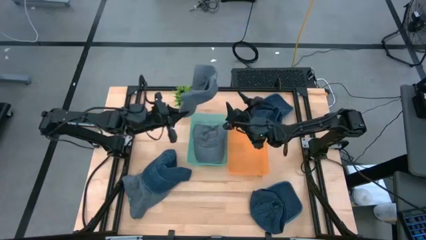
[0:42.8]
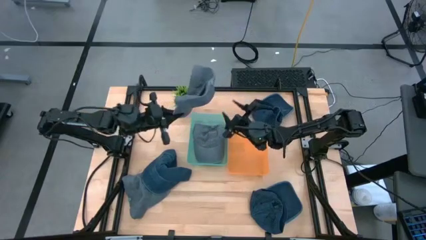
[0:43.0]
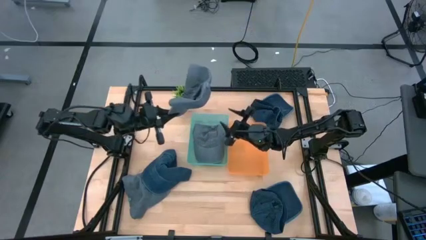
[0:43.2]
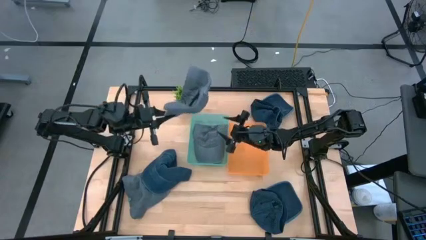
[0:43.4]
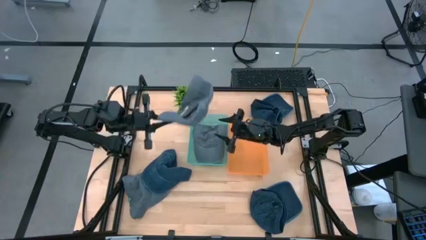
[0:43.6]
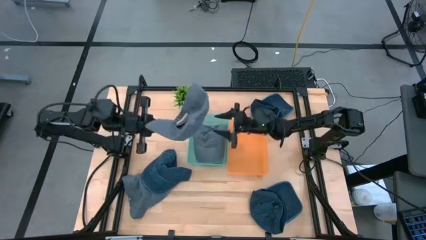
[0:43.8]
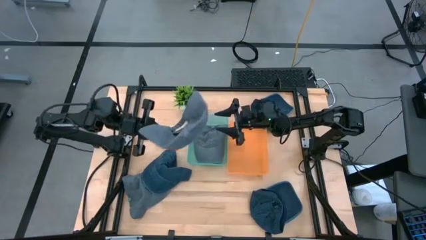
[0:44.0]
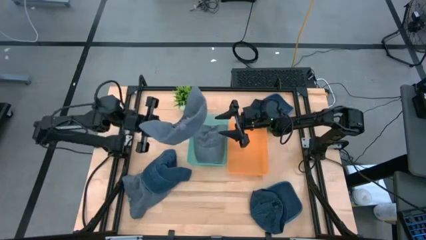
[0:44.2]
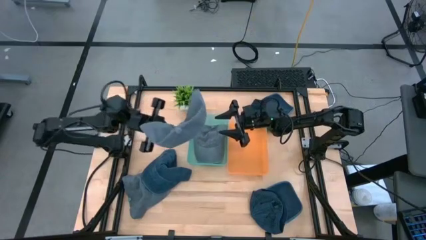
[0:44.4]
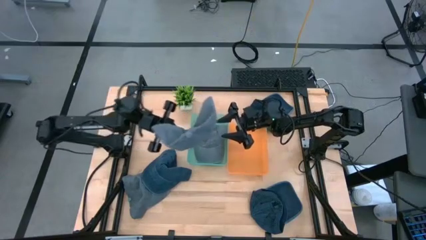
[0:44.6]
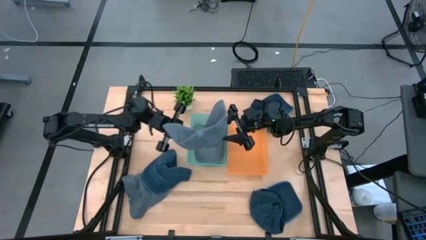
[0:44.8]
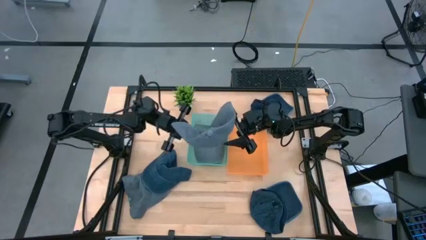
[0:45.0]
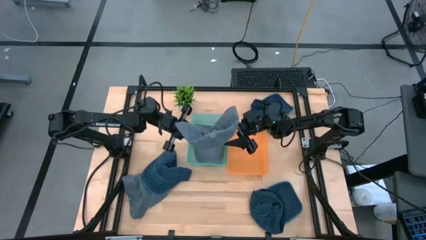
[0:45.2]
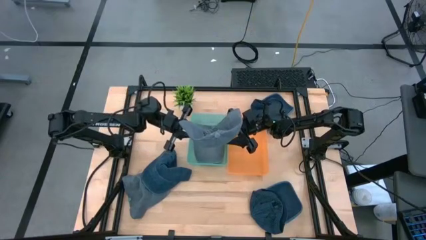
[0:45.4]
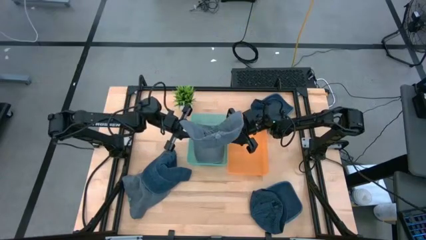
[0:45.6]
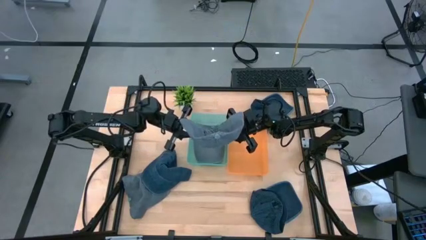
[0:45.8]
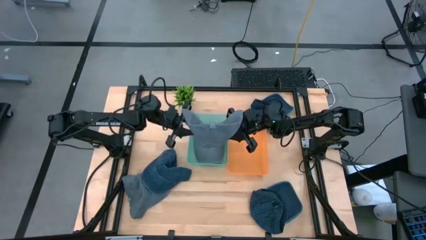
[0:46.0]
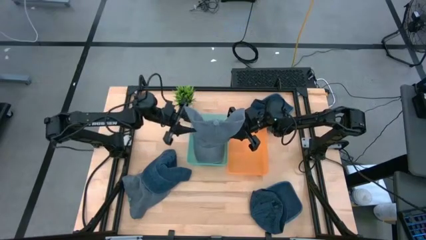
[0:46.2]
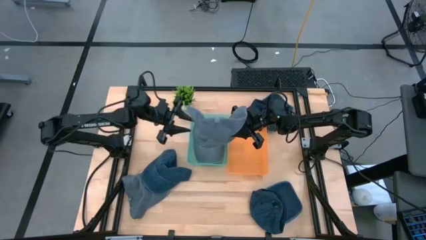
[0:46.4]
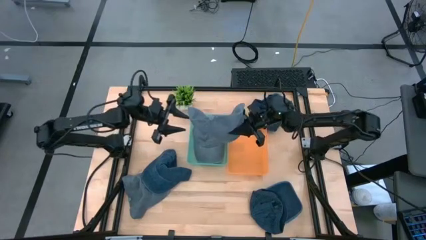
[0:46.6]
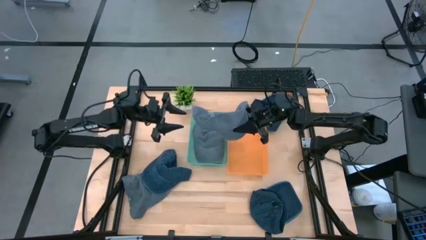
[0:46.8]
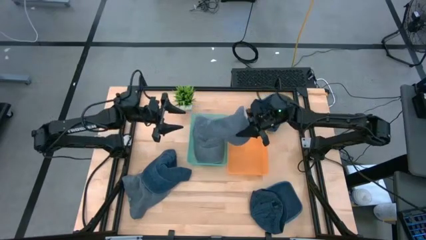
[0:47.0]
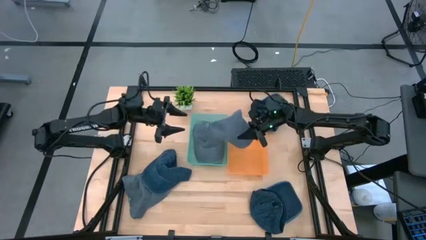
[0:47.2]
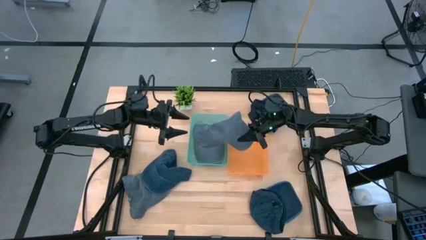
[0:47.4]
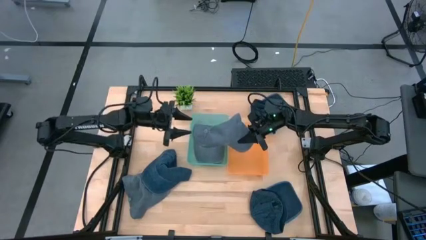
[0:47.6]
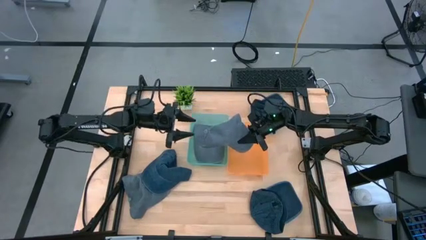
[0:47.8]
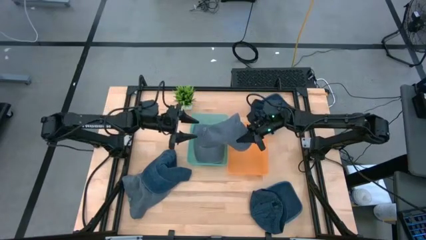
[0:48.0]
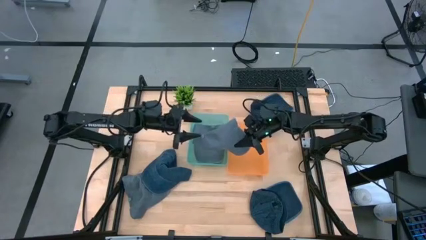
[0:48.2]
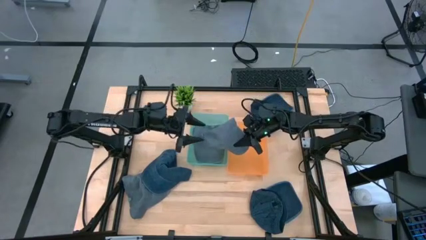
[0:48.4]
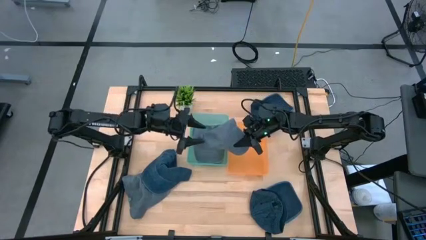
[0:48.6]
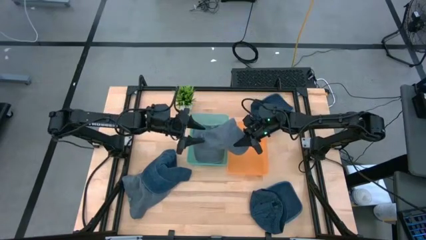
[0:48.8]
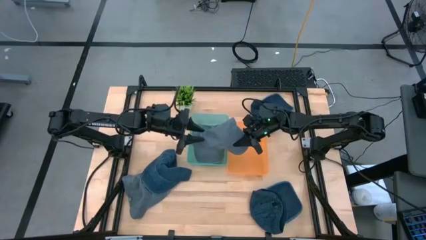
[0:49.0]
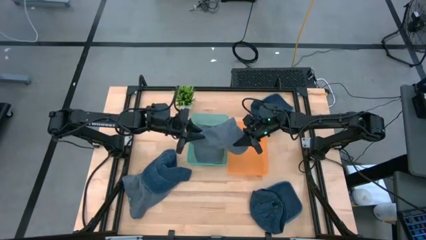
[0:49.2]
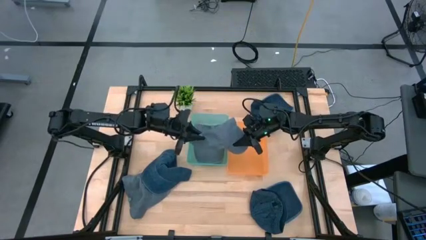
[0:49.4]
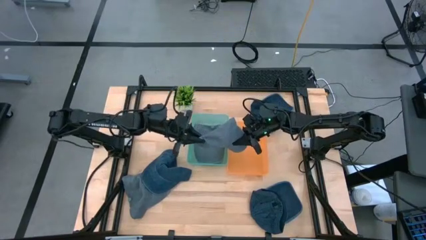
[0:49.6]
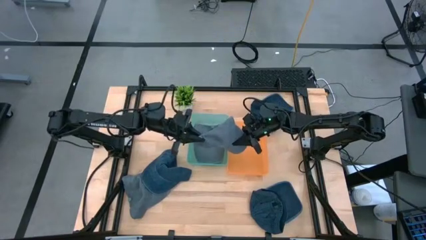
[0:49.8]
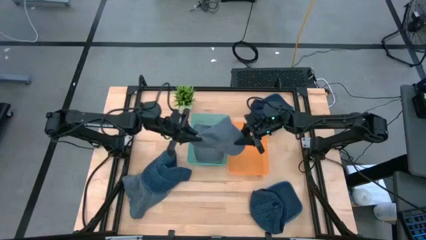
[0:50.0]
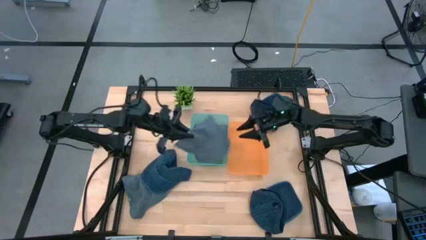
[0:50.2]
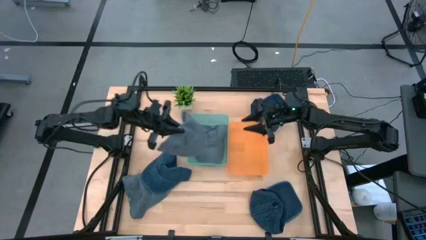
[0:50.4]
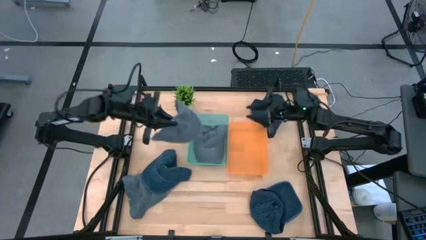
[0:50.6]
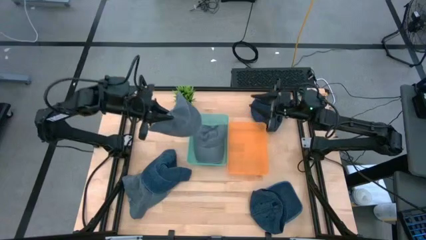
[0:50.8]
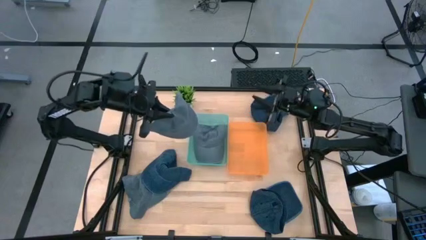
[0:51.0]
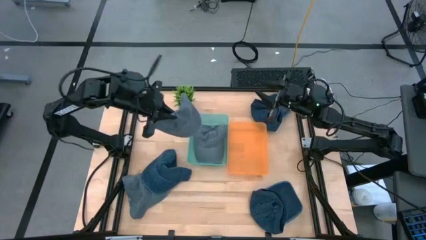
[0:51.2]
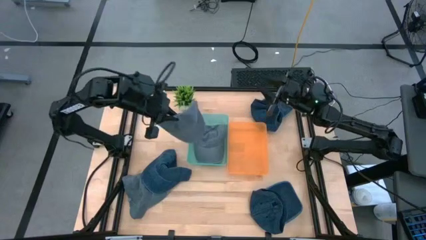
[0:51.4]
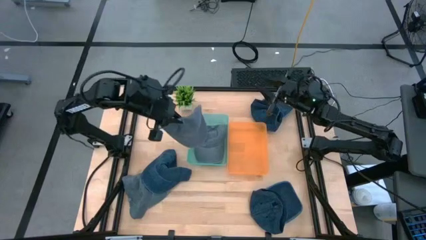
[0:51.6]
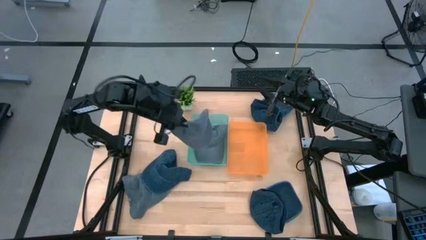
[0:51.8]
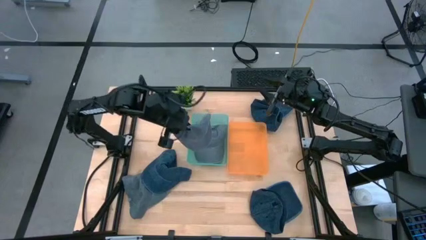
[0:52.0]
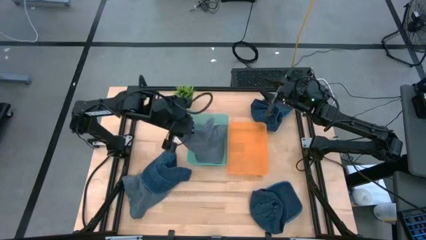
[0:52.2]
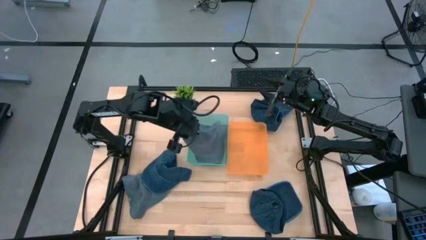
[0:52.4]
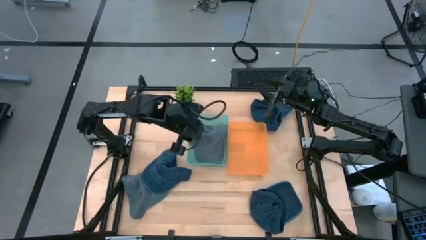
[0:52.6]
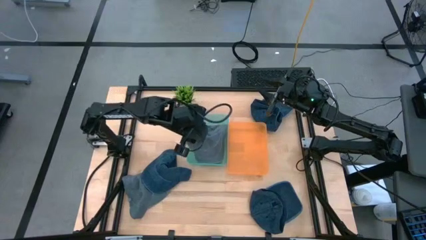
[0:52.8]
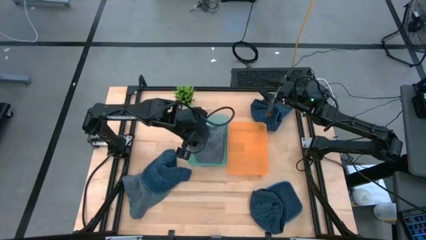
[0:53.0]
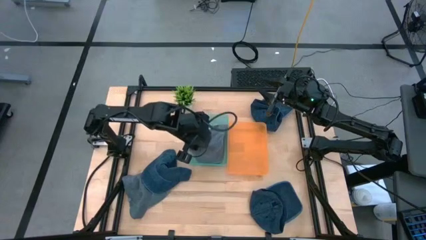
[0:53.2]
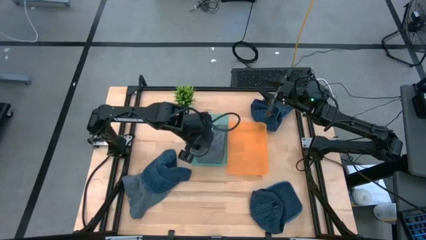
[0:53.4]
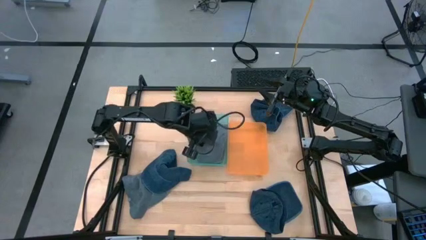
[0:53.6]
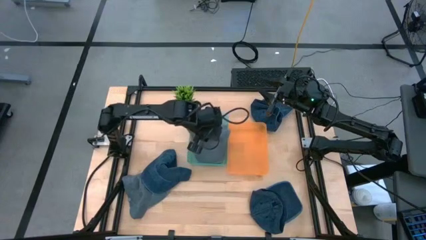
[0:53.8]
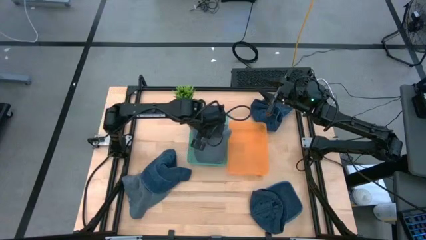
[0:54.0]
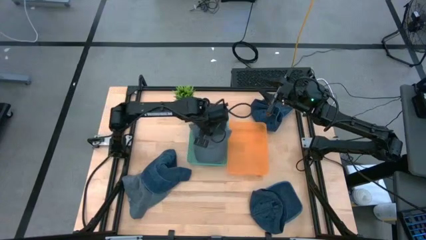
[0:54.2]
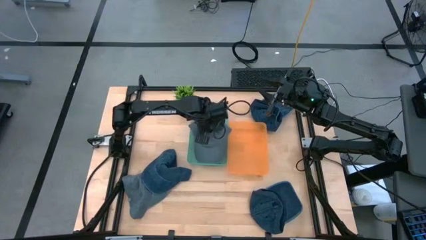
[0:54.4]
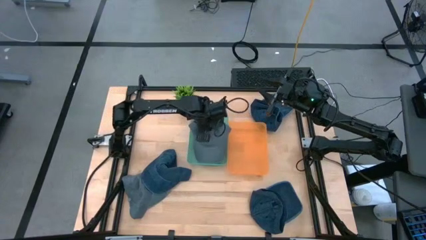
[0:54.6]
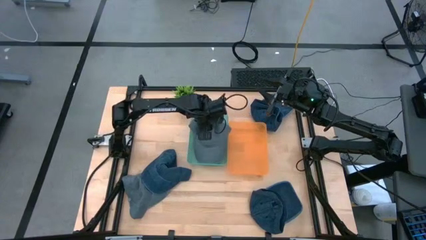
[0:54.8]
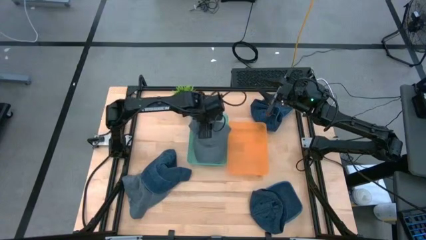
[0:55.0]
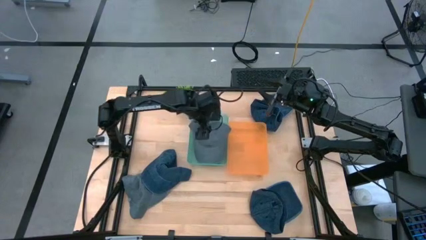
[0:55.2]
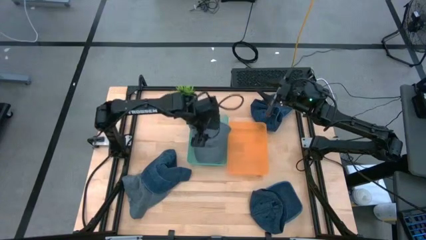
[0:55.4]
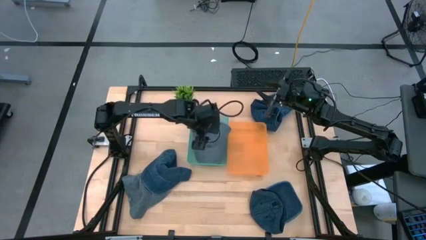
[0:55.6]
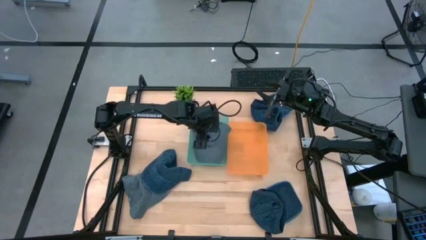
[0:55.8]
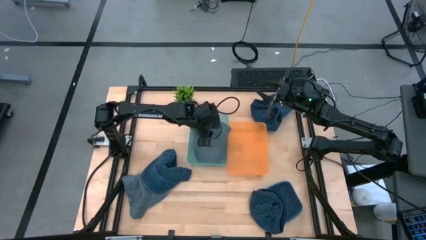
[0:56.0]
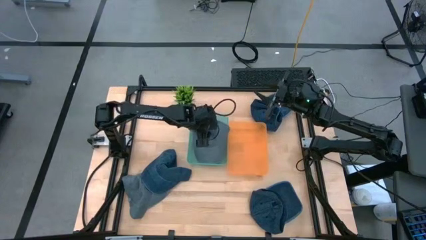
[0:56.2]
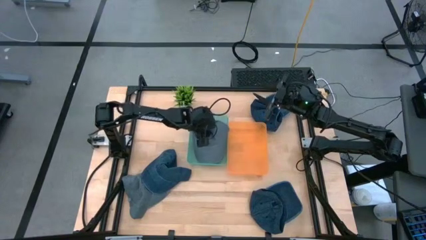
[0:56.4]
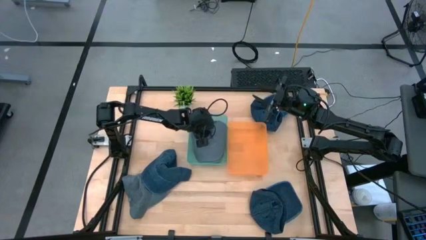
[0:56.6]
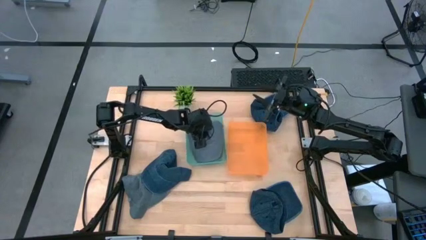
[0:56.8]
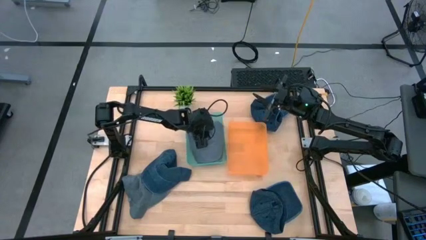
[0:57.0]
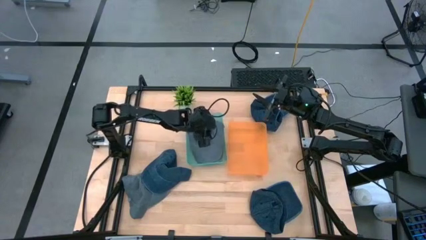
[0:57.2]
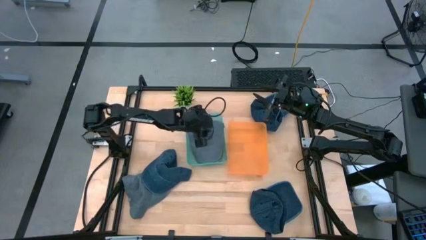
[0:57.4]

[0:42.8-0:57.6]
Task: Pick & Place hat
Put the top gray cap into the green bin
